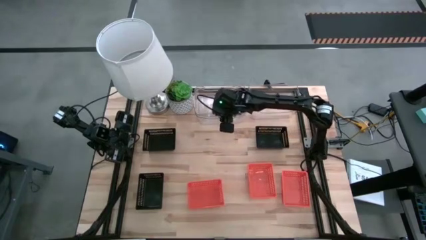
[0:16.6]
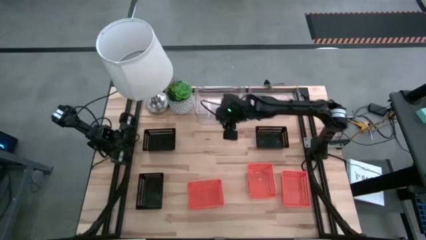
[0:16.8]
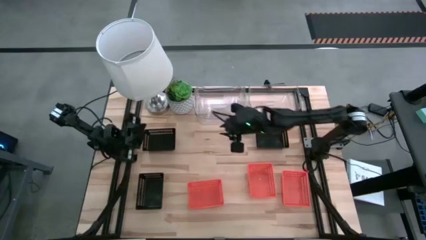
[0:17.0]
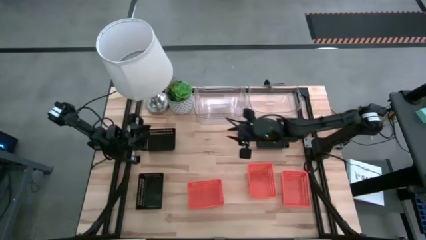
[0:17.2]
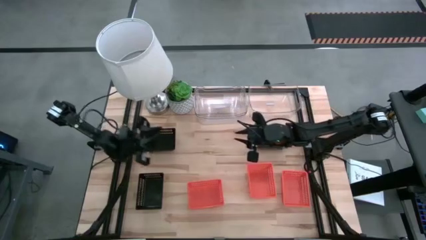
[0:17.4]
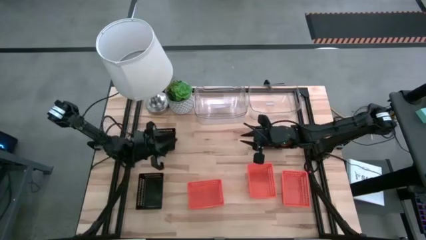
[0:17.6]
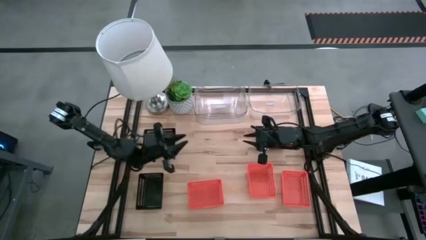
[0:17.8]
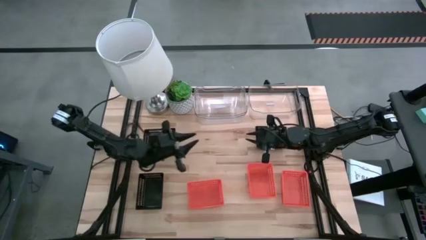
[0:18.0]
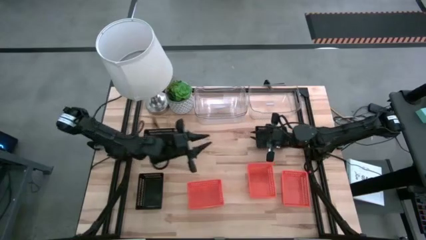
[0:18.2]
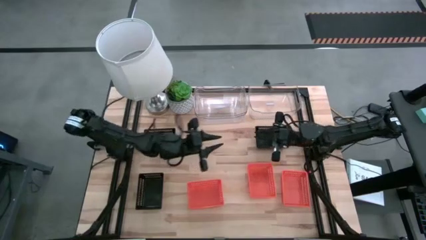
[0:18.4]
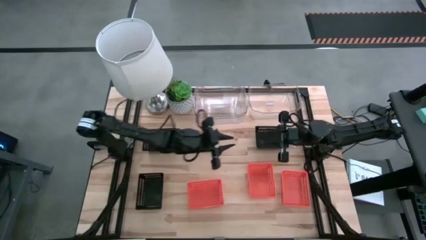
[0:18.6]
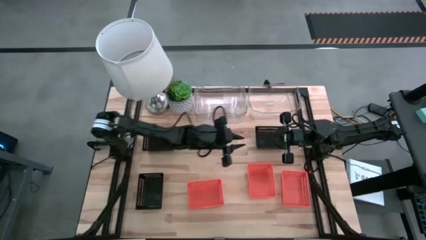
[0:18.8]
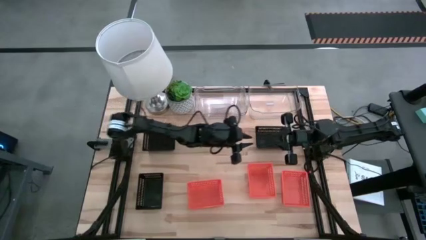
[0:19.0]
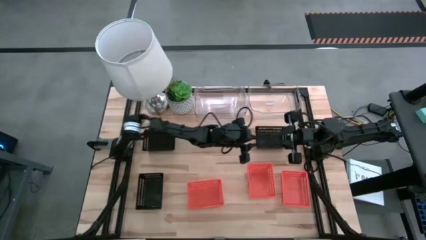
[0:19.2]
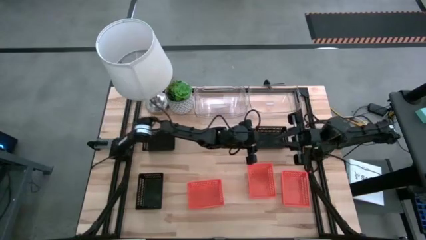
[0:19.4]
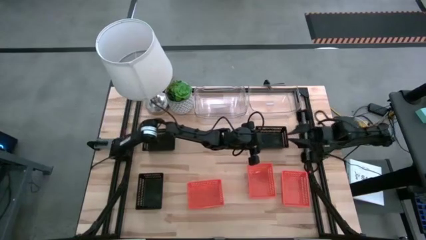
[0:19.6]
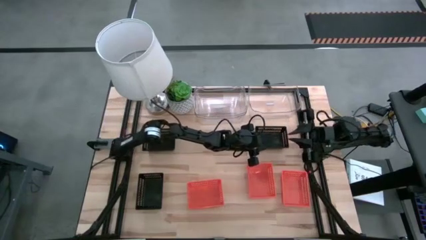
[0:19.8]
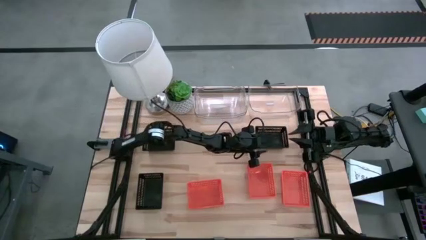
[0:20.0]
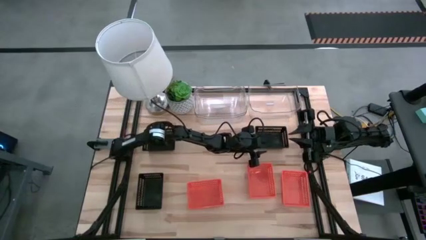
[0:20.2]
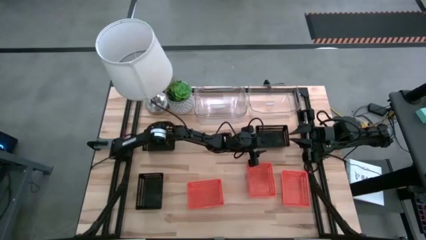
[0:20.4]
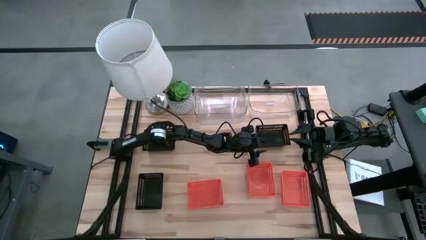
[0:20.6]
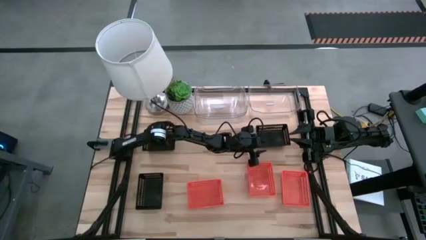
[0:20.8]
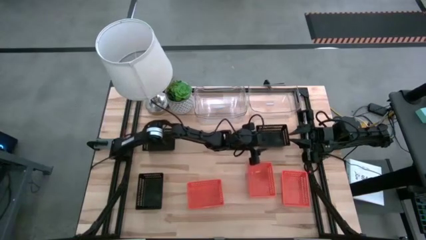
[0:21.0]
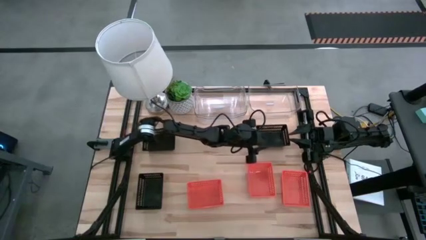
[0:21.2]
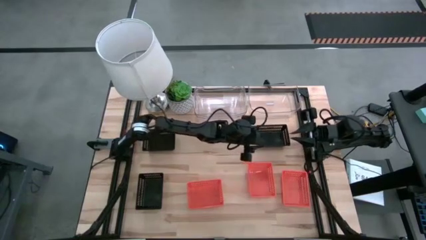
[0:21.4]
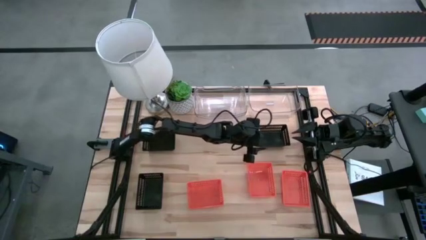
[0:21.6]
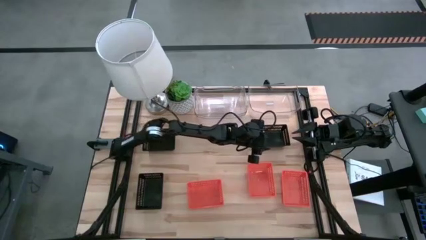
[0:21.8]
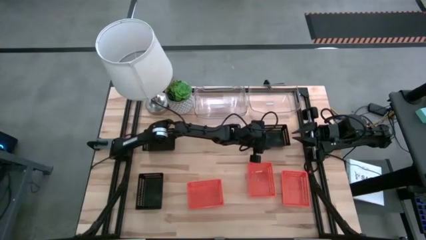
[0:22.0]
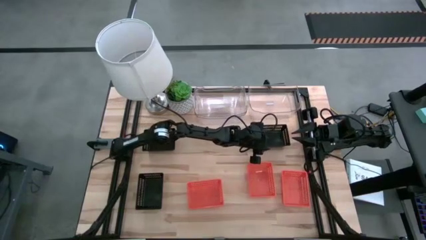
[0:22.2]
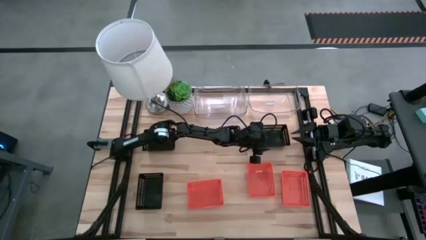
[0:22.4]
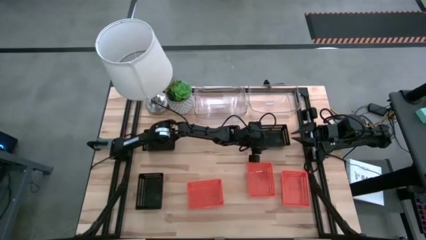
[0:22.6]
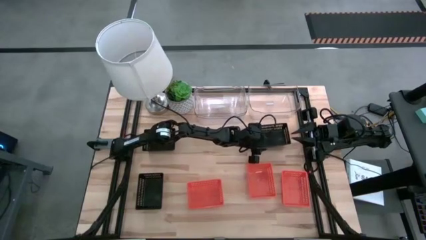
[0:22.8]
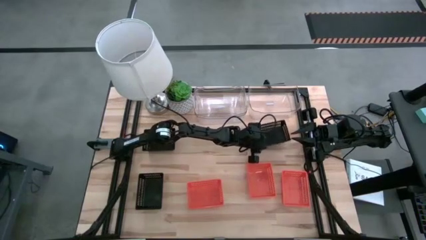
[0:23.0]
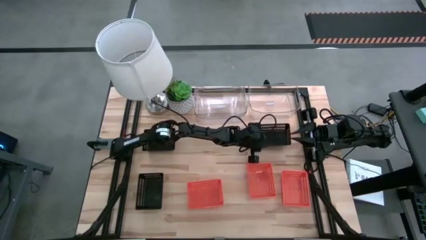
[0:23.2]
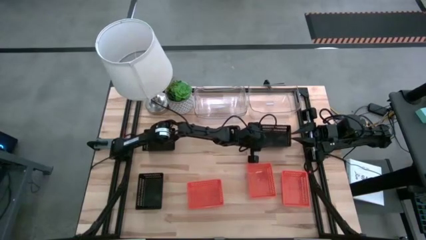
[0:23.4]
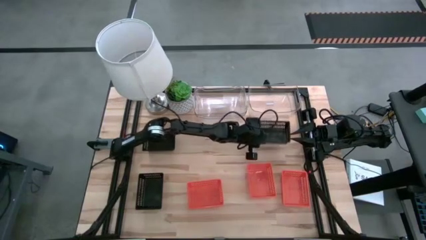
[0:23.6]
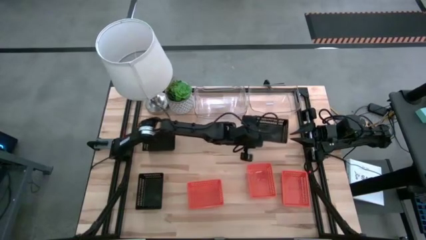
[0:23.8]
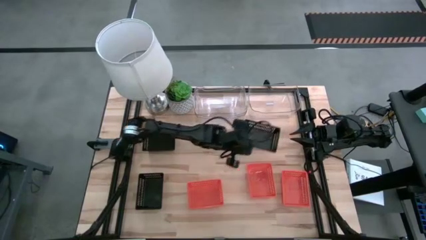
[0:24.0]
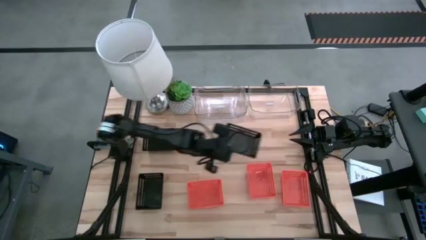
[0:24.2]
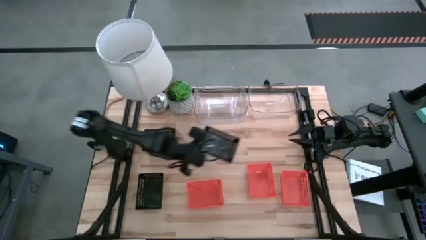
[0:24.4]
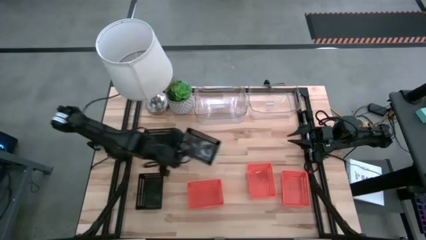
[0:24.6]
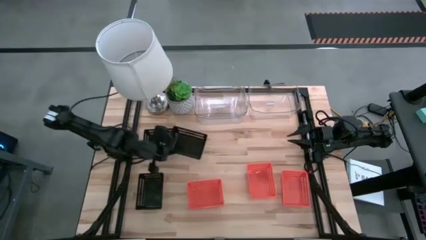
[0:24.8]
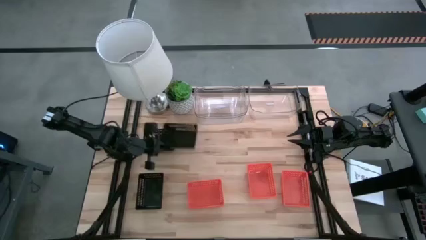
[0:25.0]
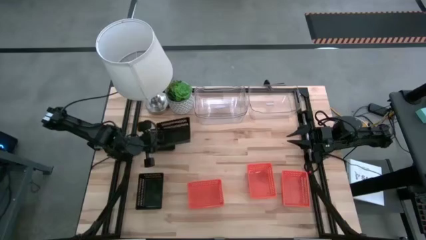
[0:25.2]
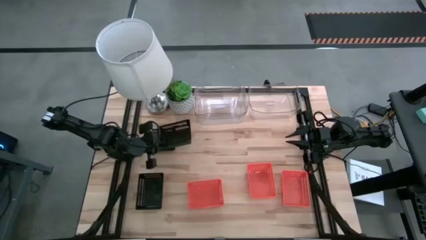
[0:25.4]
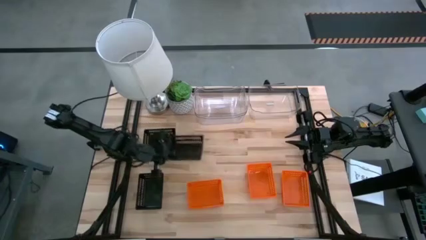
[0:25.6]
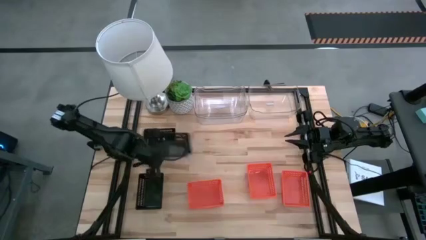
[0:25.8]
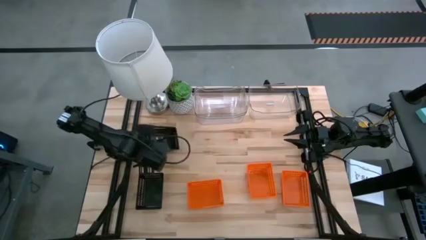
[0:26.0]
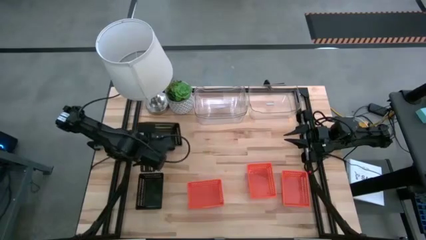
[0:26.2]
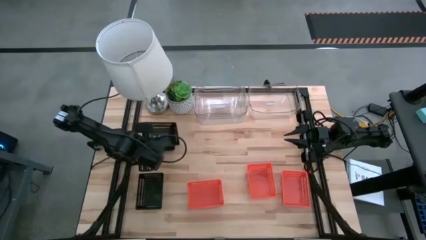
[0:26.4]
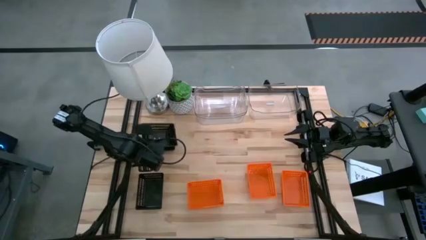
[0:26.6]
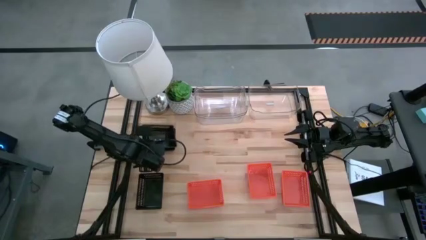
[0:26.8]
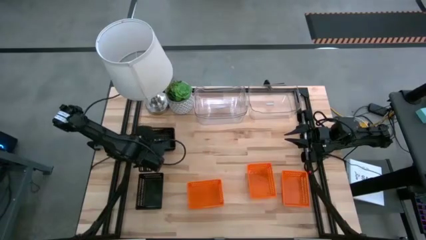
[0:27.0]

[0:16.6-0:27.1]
Stack the top right black bin on the top left black bin

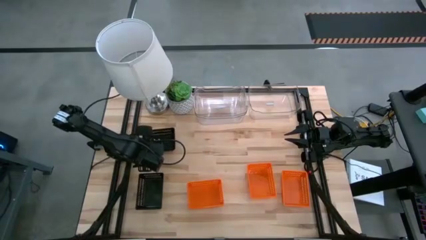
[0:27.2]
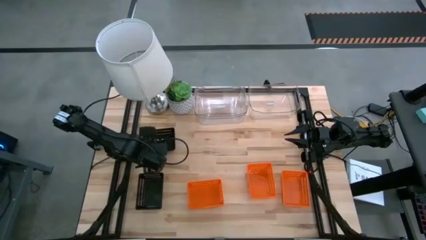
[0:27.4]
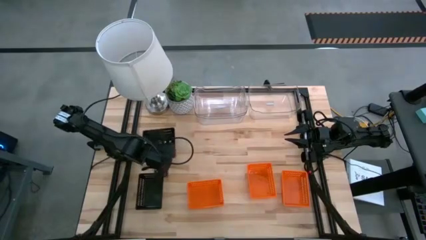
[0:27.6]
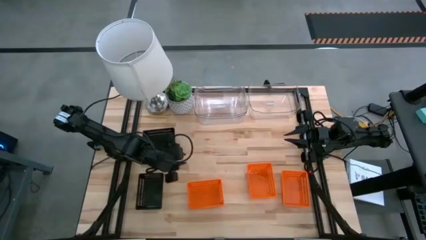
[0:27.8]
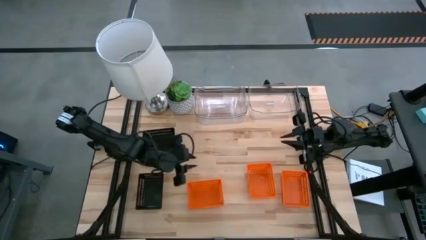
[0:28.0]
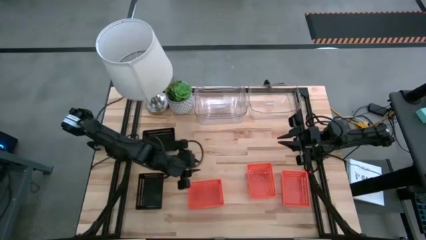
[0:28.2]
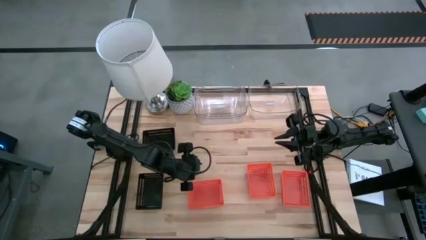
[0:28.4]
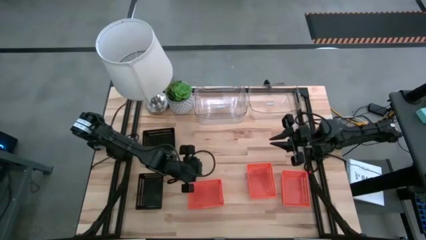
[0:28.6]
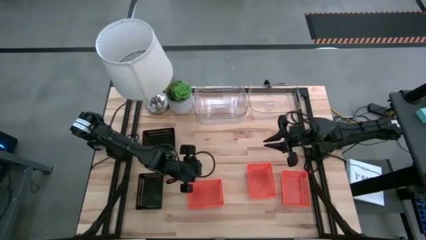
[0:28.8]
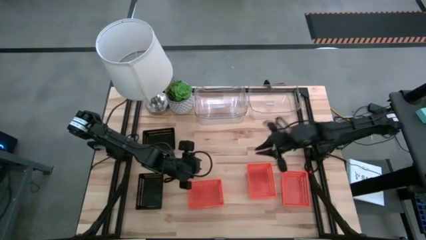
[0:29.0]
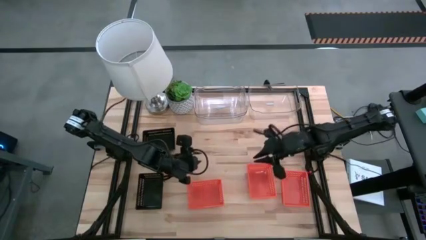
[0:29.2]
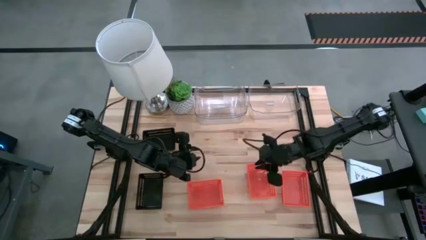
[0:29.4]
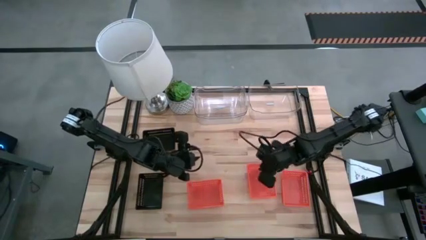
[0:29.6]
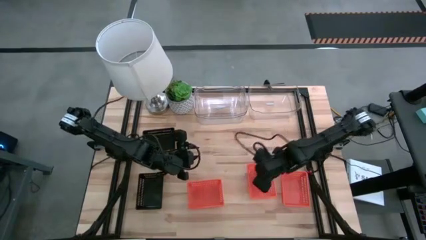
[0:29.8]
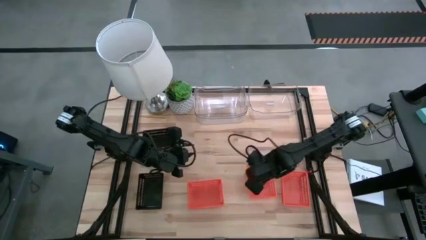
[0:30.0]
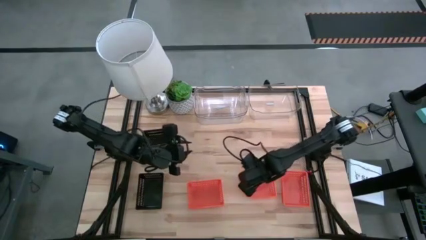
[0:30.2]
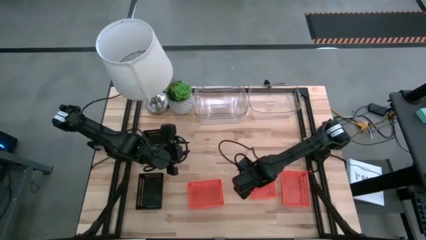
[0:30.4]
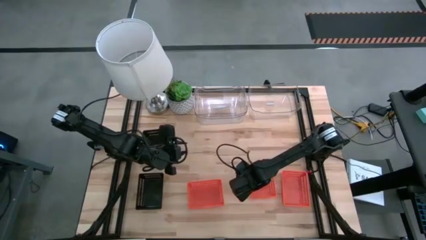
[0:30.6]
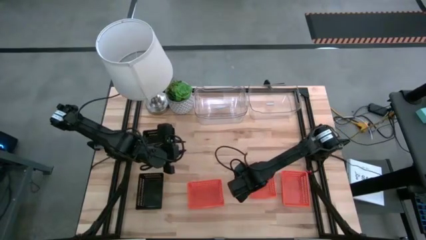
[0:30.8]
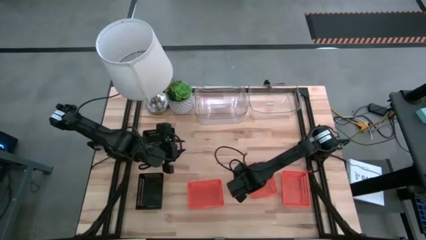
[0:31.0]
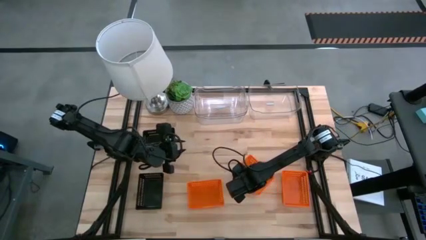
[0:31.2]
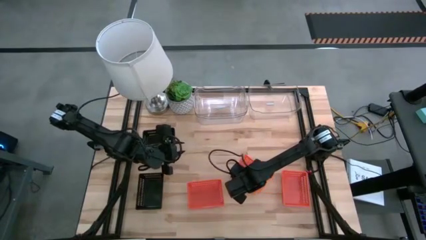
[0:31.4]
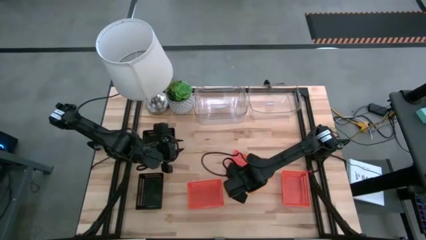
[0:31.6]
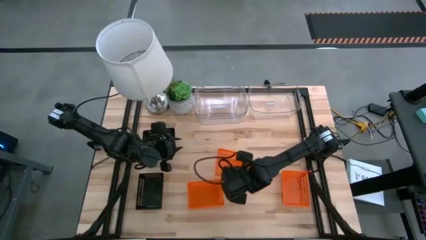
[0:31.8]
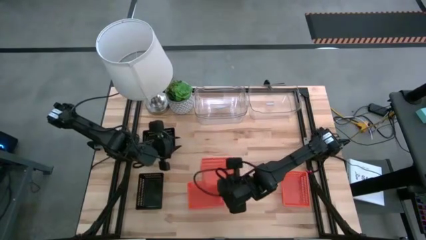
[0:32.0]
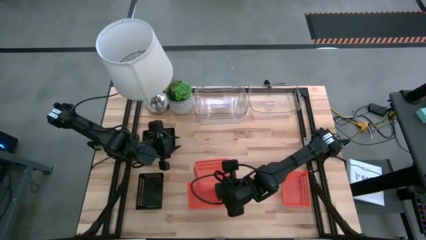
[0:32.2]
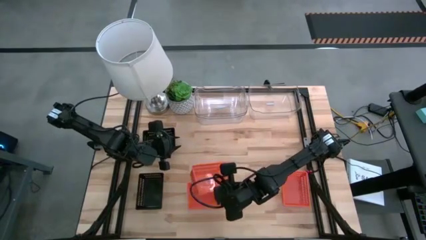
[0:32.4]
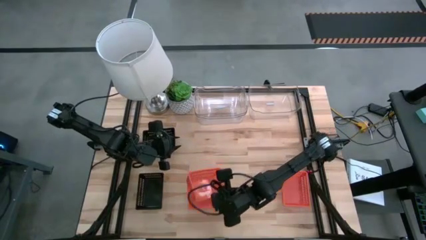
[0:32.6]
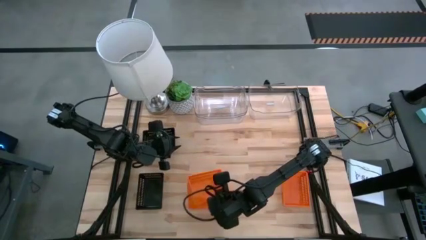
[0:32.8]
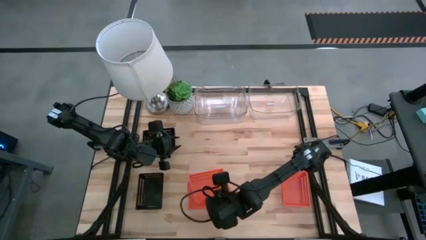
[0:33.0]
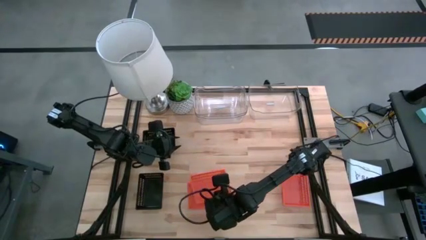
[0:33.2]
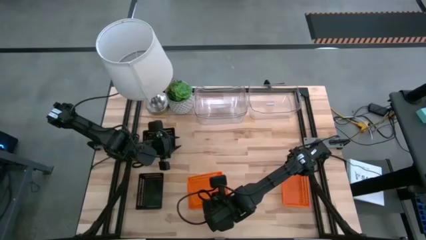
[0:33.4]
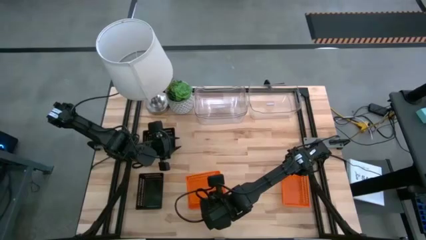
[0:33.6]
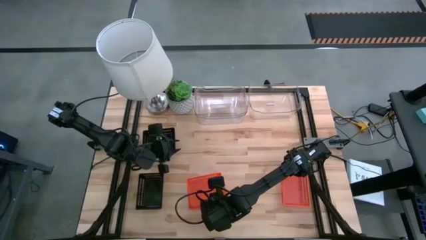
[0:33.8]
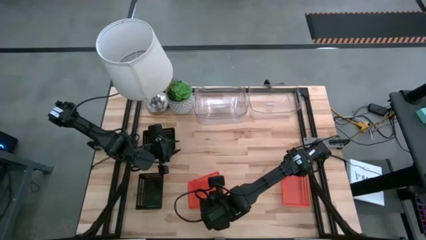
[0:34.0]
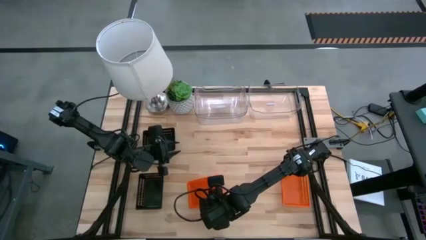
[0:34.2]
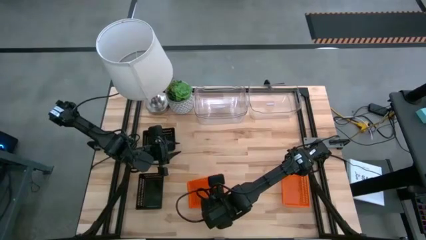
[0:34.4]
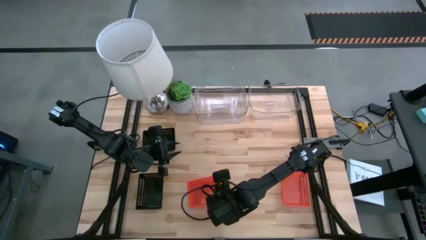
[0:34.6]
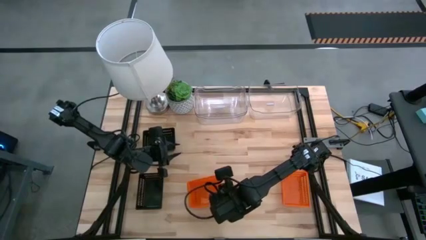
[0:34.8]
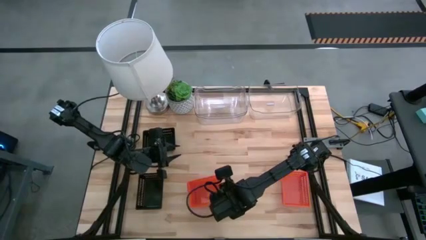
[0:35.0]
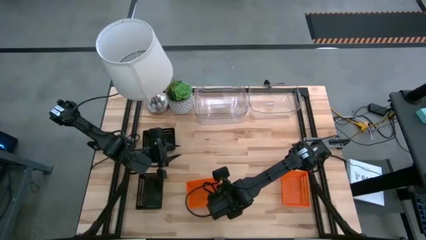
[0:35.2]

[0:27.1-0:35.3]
Stack the middle right orange bin on the middle left orange bin
